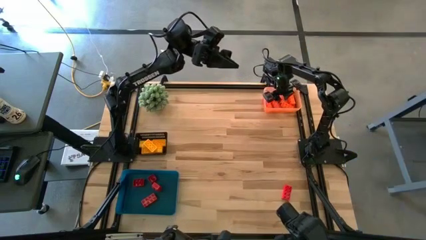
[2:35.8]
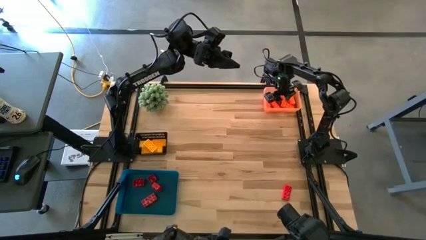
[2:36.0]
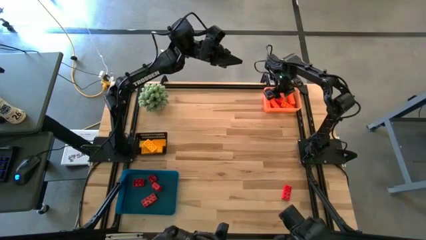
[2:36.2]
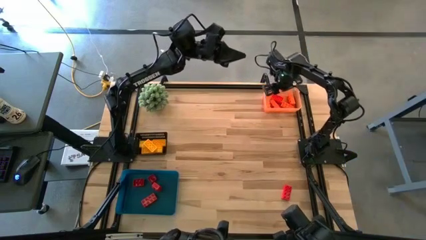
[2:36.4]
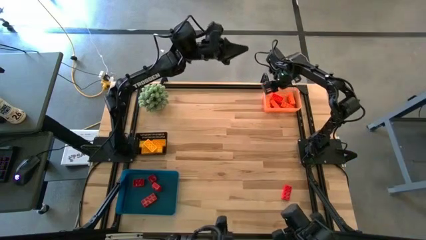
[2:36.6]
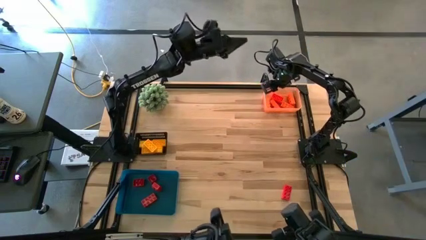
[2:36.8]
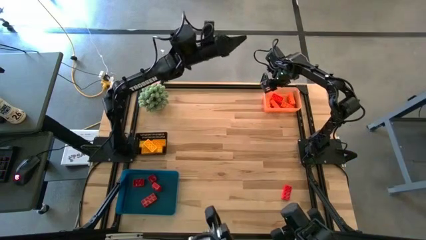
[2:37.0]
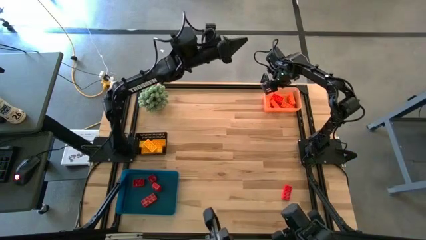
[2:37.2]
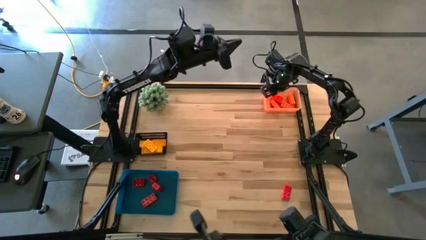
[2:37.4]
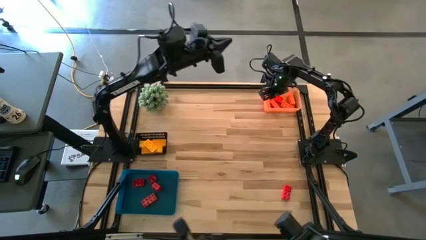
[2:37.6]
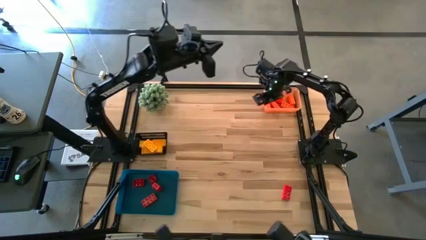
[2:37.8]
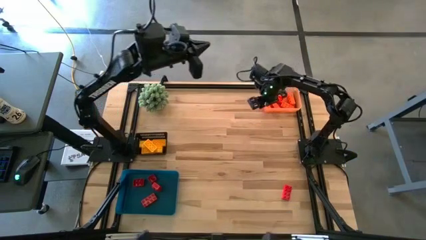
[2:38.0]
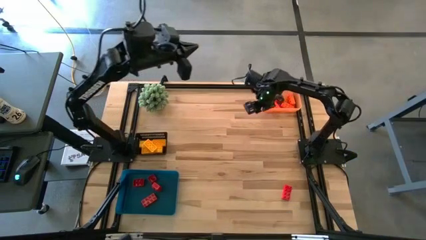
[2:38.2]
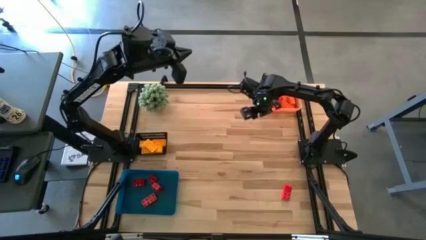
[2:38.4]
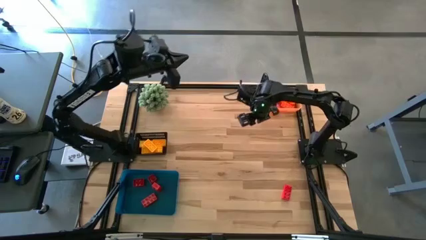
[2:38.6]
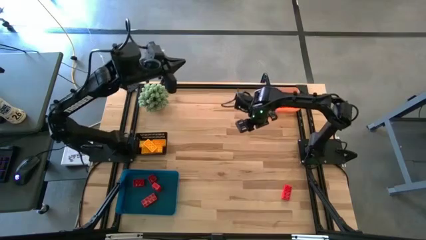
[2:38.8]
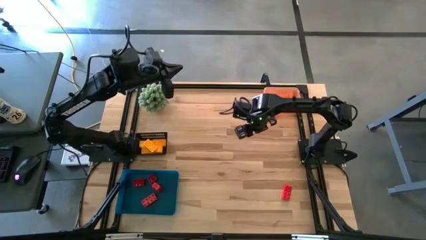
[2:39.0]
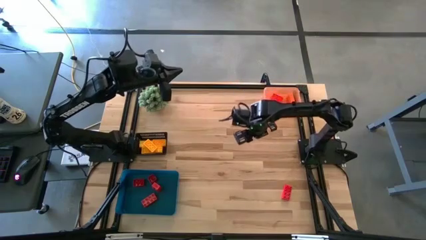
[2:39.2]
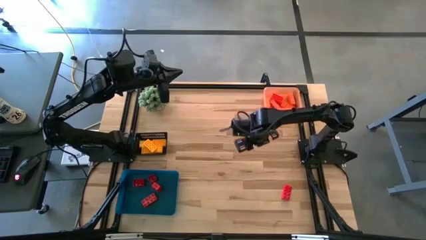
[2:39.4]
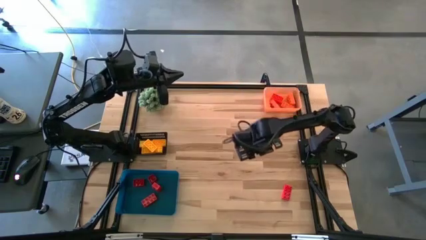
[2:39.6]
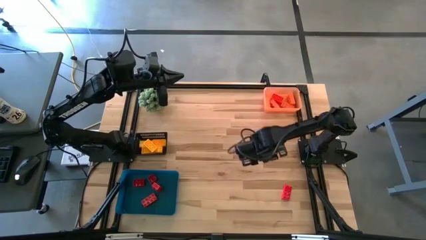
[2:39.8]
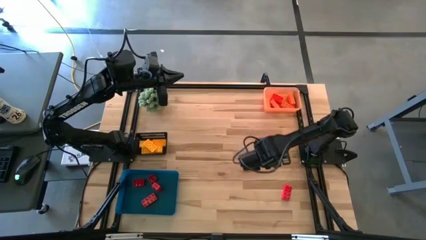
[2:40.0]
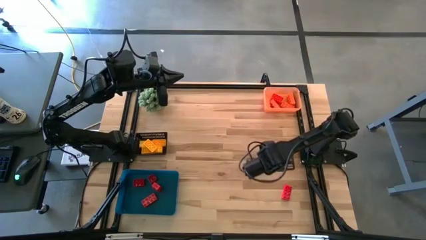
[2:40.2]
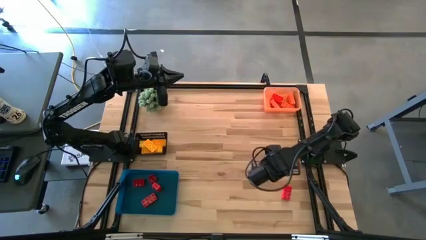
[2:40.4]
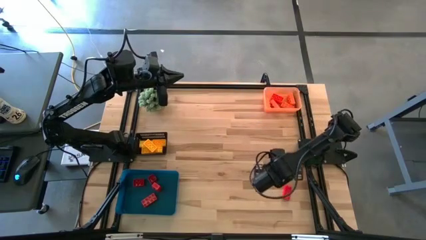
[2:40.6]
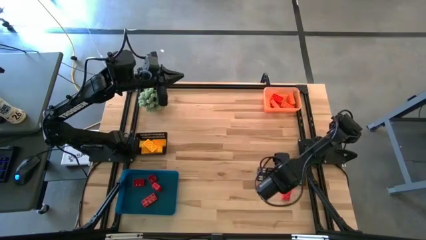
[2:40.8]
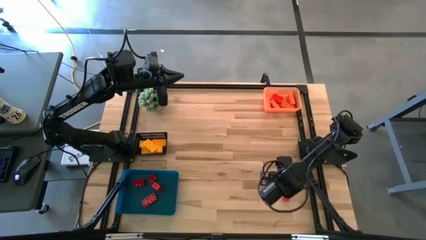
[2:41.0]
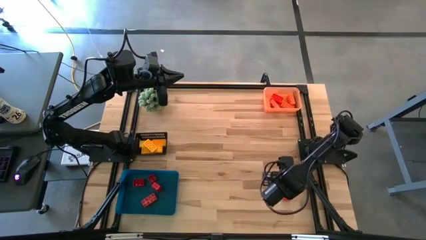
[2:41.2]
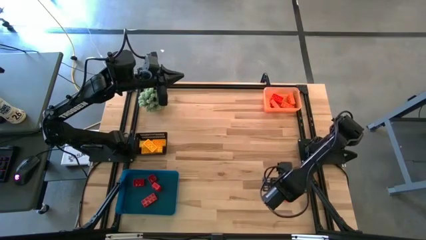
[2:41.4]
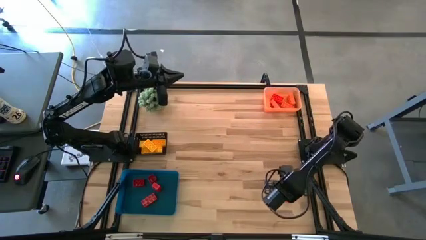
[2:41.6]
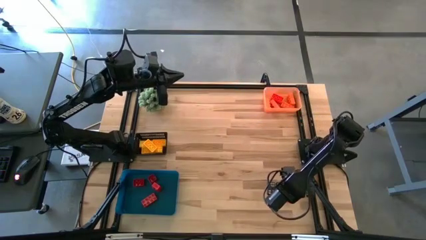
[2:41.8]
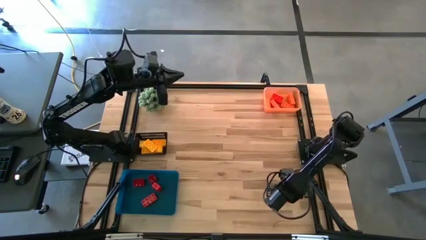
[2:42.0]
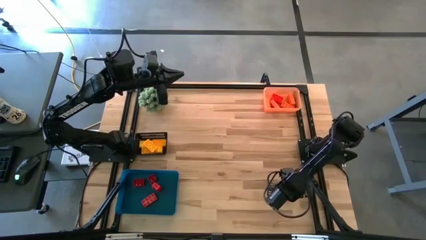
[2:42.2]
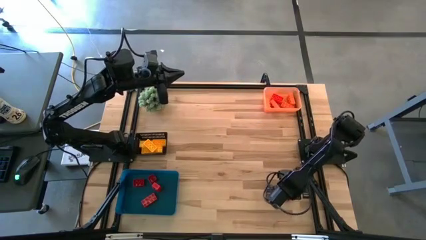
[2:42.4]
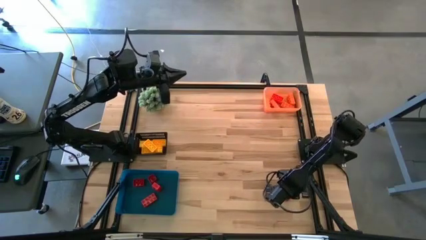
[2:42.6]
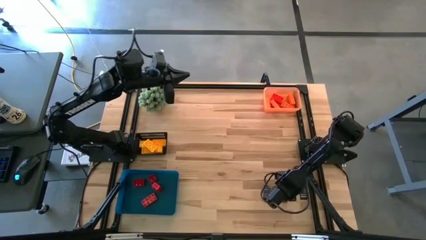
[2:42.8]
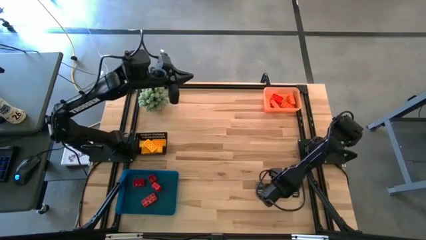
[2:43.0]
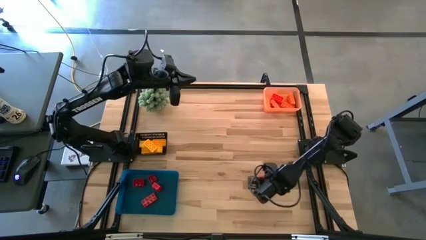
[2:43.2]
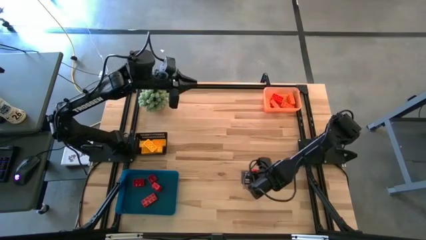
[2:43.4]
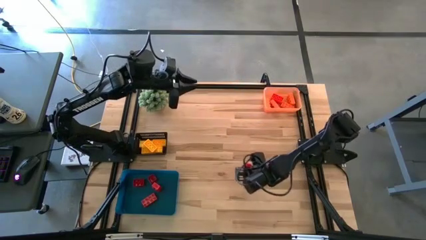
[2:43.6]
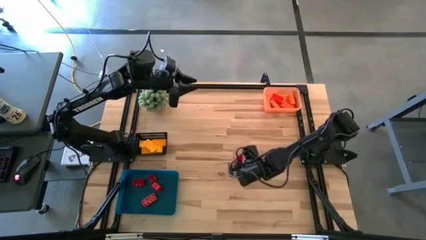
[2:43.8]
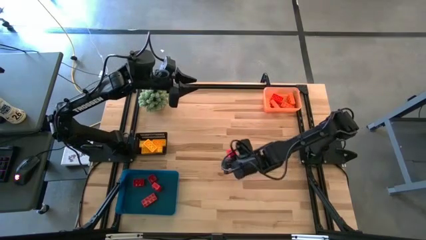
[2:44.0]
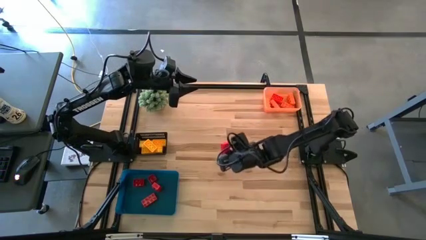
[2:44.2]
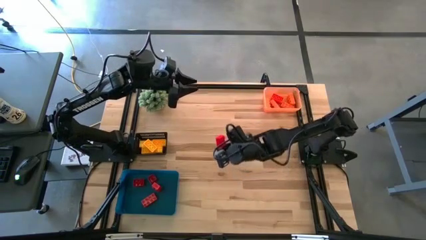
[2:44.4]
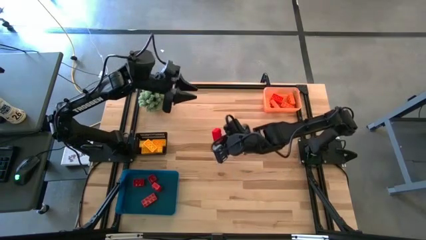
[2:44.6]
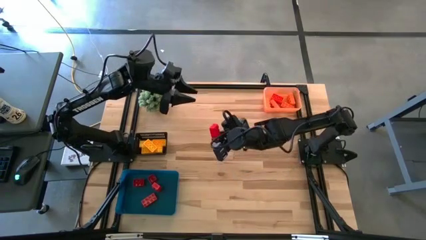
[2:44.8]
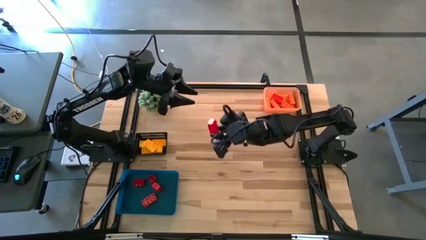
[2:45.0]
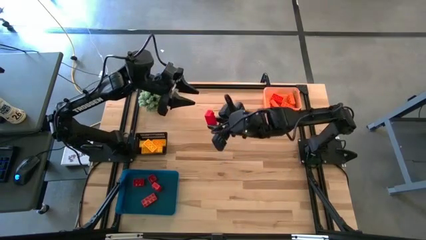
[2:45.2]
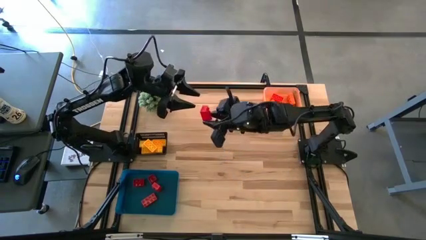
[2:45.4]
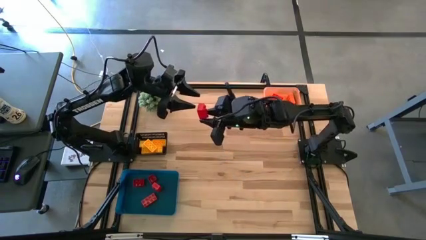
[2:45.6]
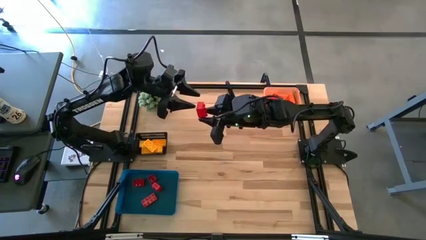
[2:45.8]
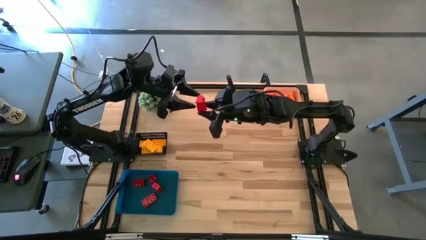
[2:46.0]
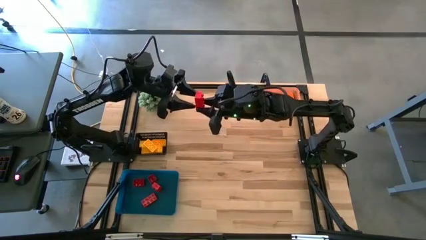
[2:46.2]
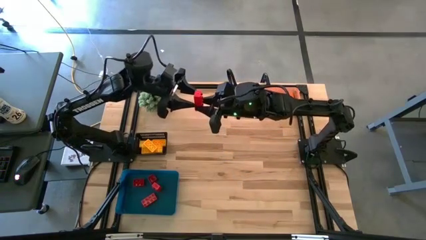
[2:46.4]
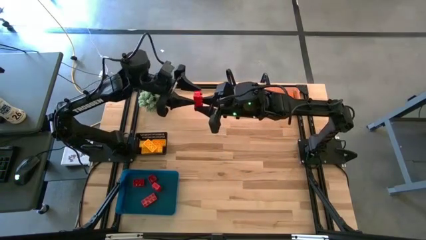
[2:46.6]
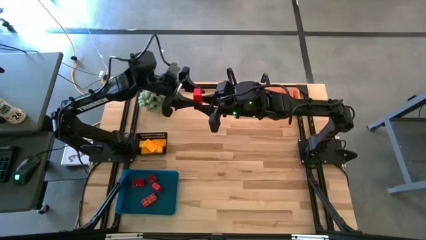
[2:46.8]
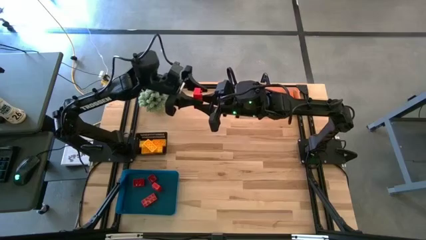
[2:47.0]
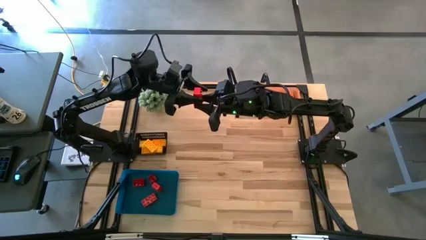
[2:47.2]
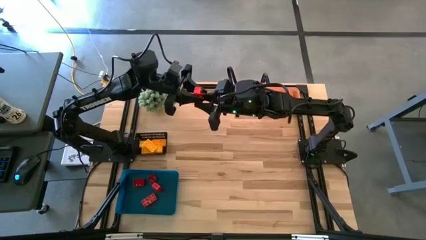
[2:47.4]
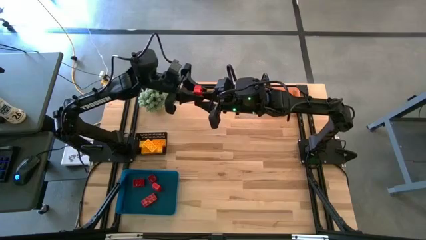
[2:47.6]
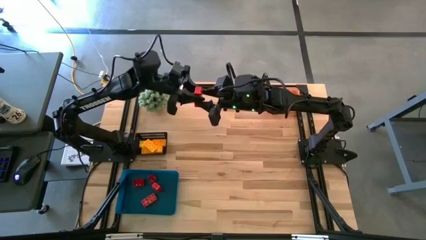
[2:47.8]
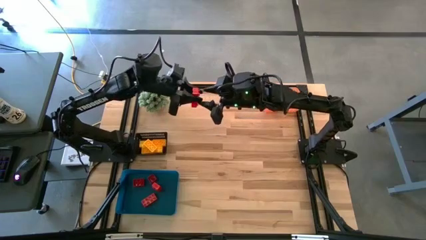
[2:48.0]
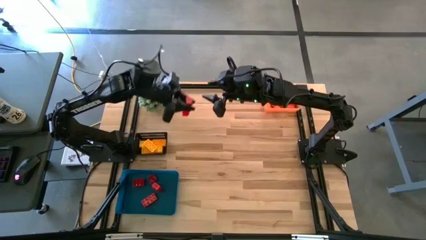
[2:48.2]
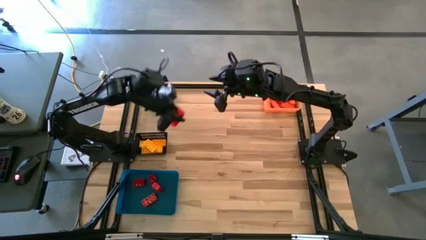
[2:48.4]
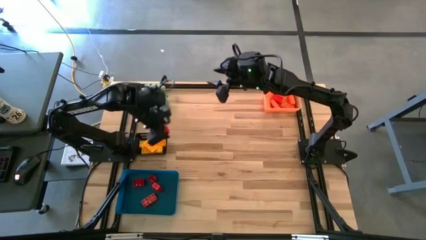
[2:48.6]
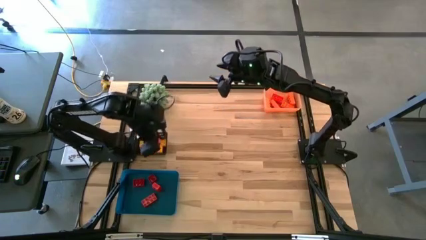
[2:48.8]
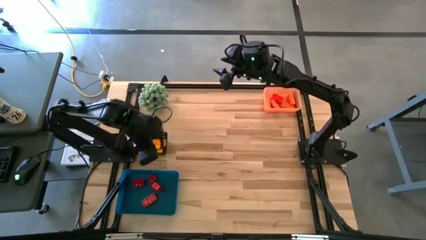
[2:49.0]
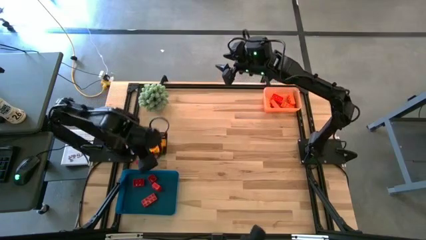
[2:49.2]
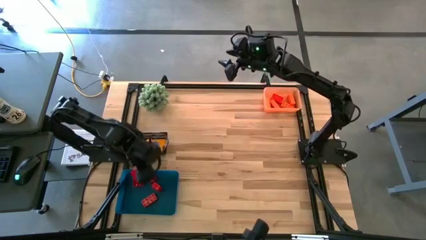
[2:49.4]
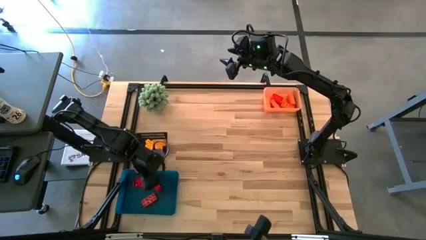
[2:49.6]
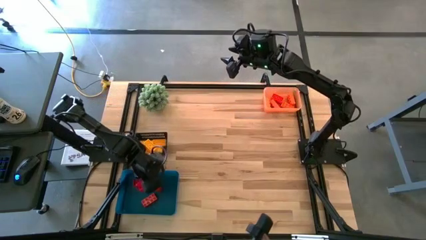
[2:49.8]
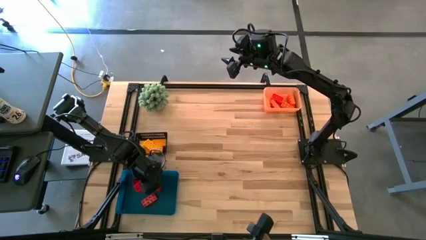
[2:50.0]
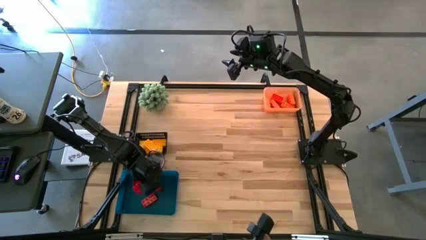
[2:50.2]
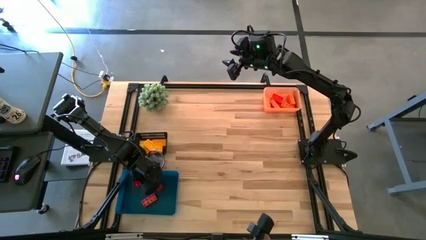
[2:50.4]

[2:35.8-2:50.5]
Task: Sort & place blocks by color
Put the red game piece into the blue bin
